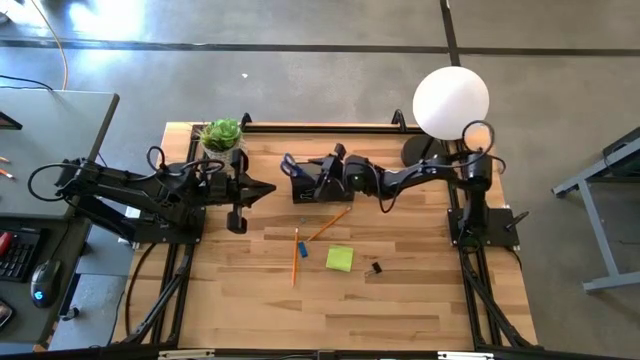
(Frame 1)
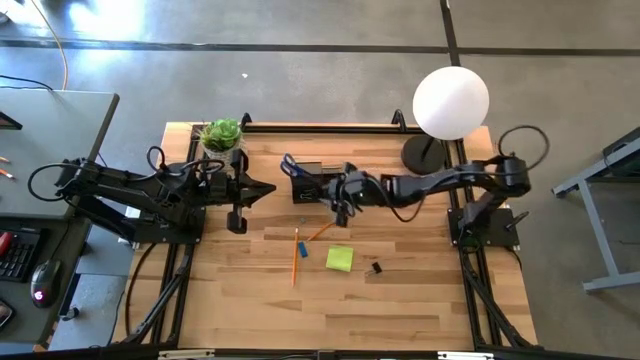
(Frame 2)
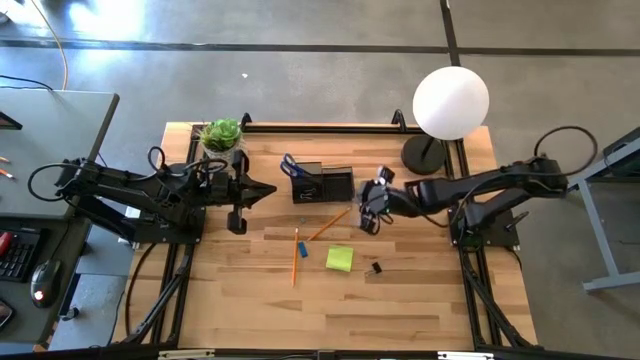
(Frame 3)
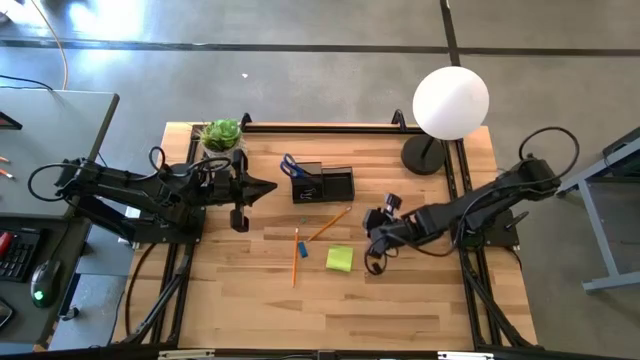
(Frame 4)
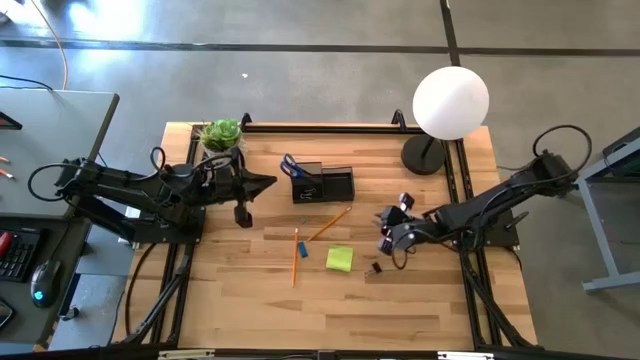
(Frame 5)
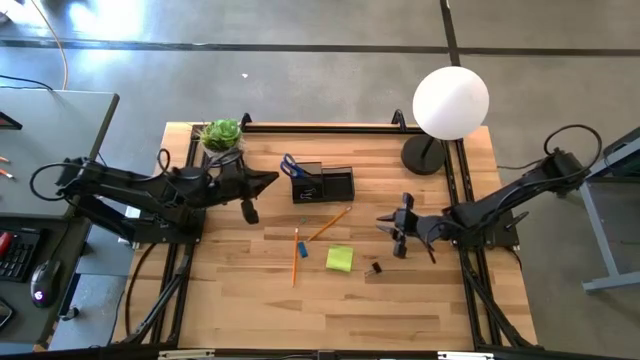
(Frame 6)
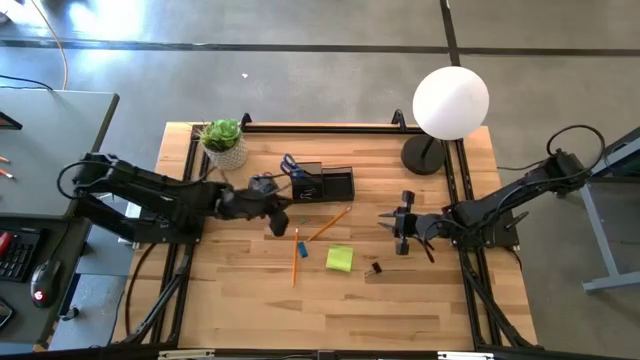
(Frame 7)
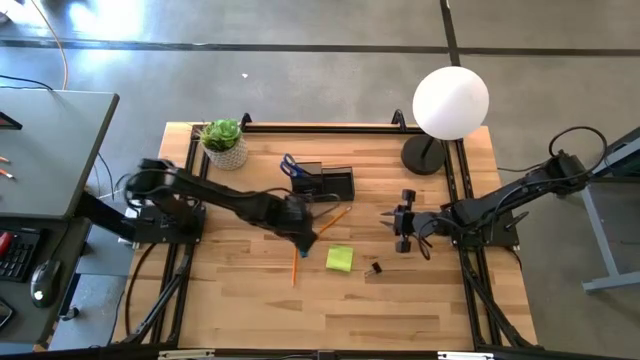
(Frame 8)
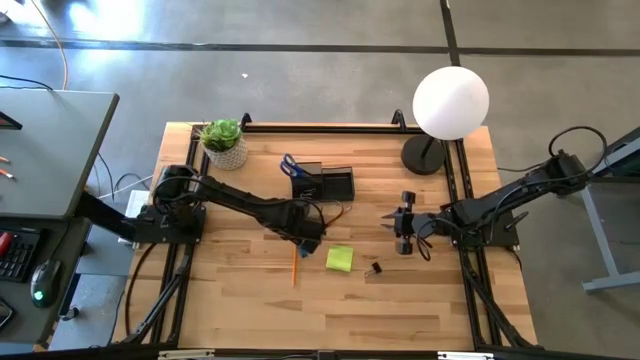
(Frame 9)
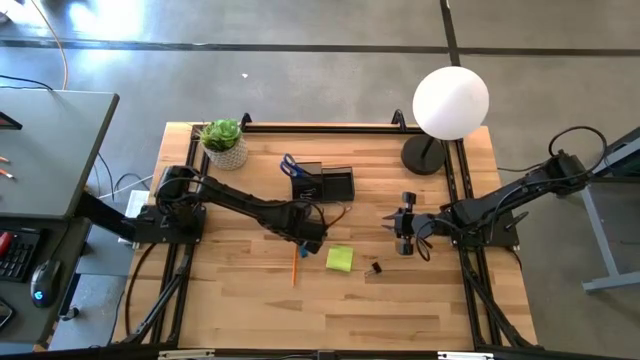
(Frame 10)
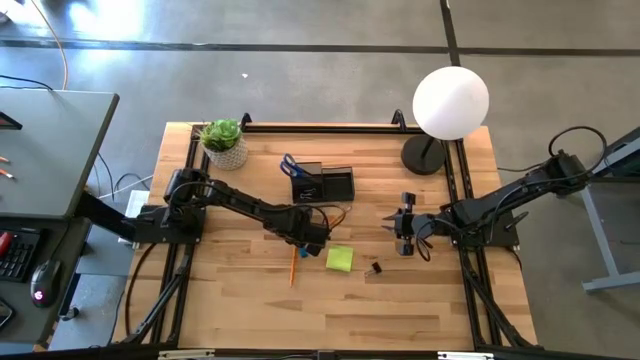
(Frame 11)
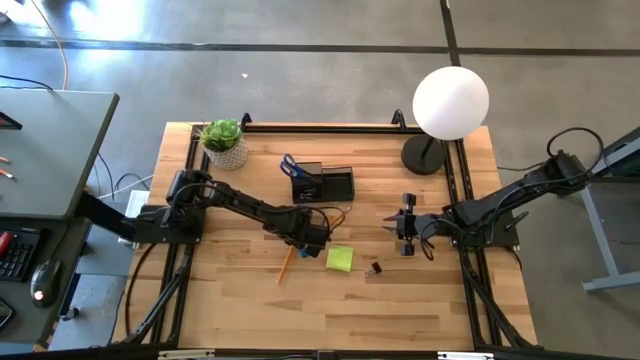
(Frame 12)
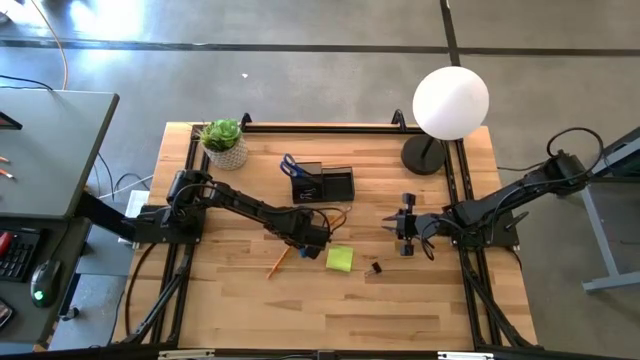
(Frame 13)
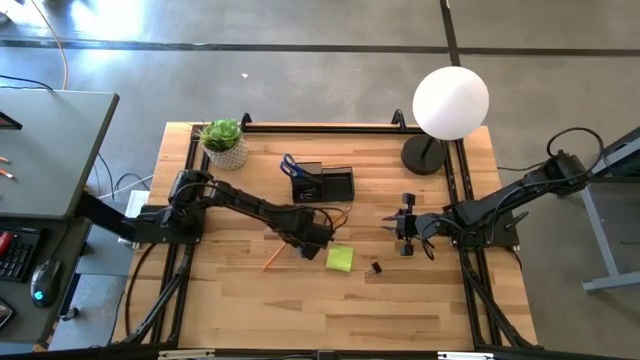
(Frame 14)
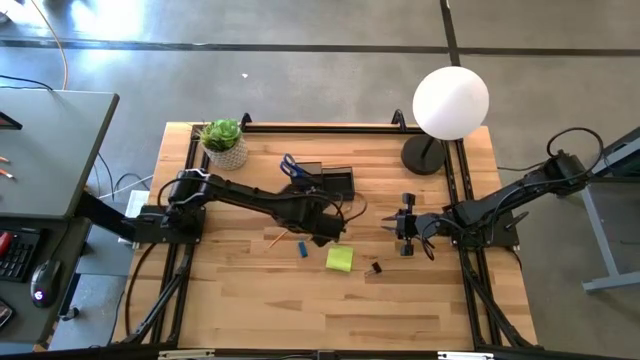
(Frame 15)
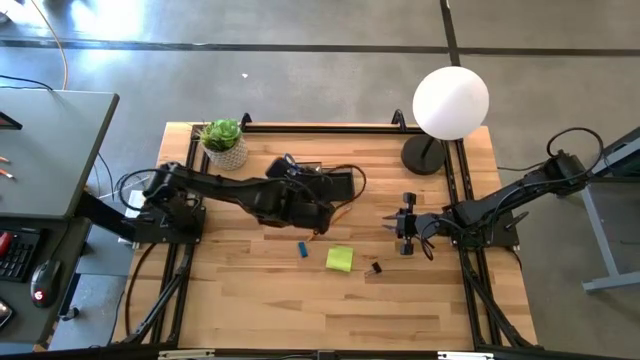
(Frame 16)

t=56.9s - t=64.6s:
Task: Pick and place office supplies into organizer
Put the orange pencil into the black desk organizer

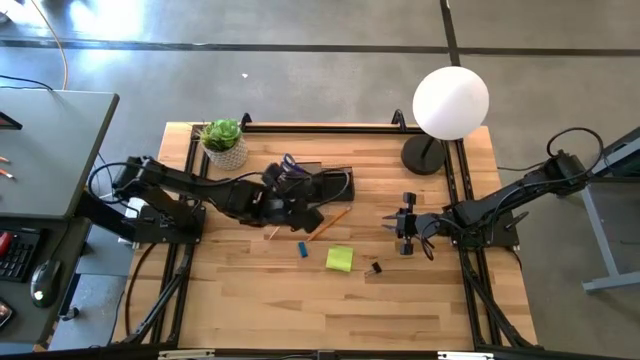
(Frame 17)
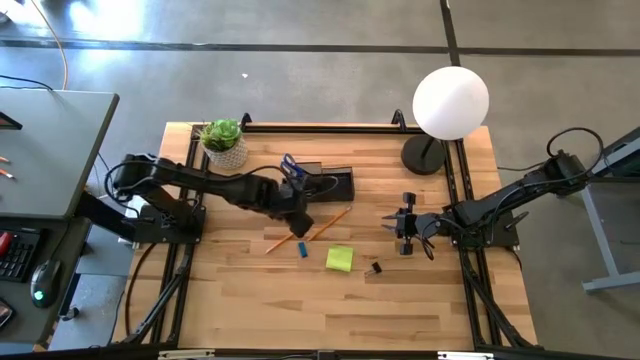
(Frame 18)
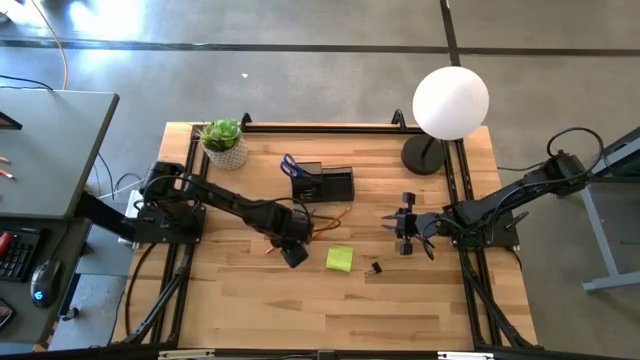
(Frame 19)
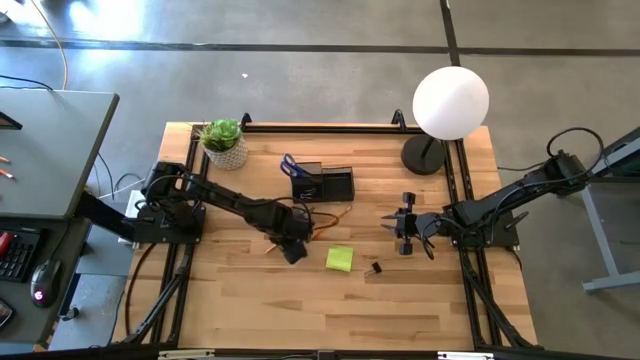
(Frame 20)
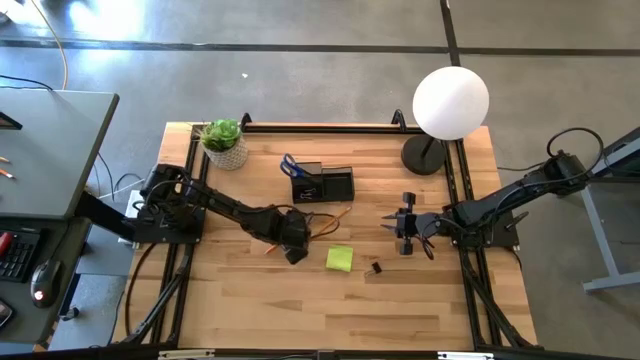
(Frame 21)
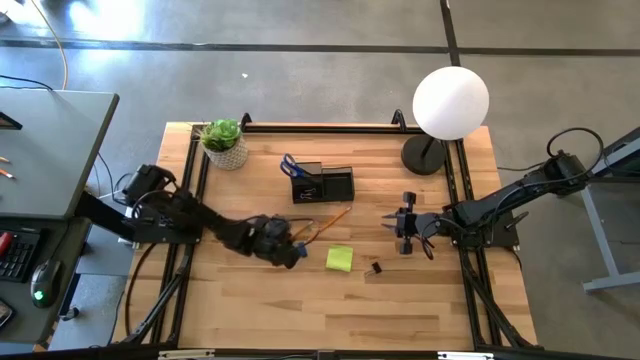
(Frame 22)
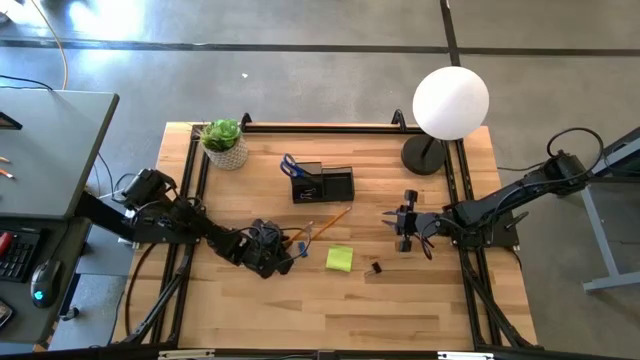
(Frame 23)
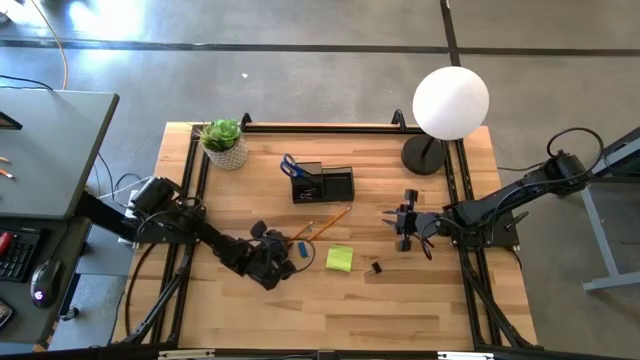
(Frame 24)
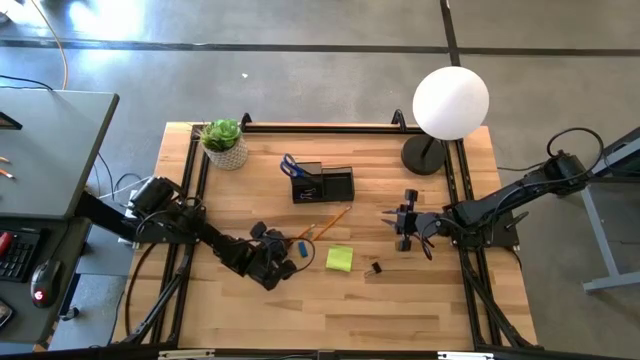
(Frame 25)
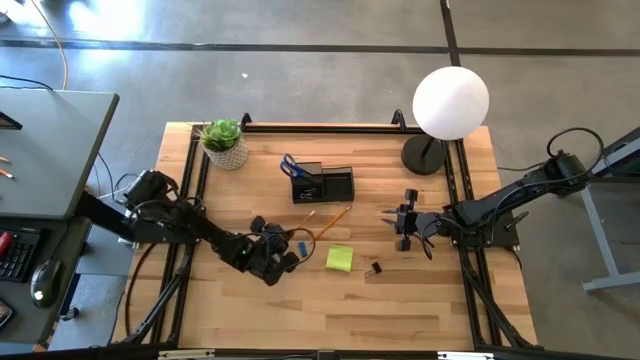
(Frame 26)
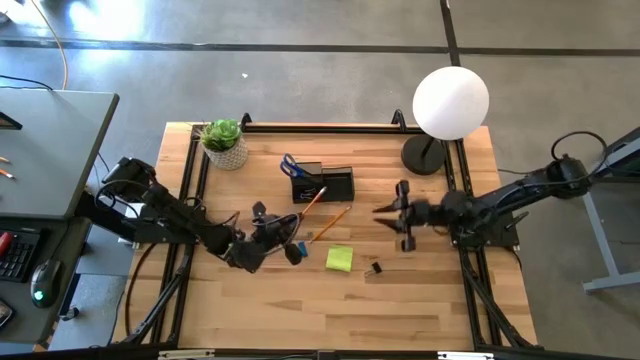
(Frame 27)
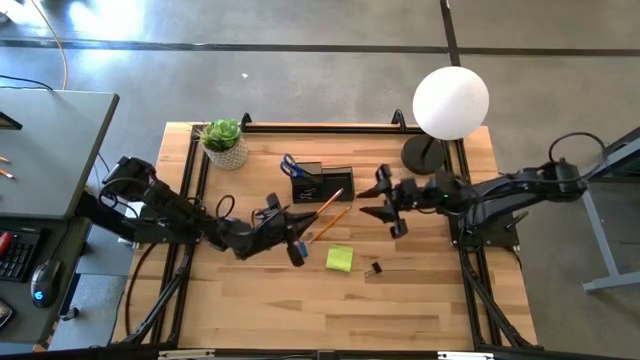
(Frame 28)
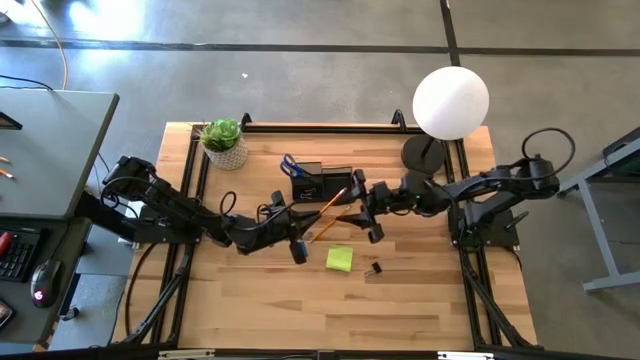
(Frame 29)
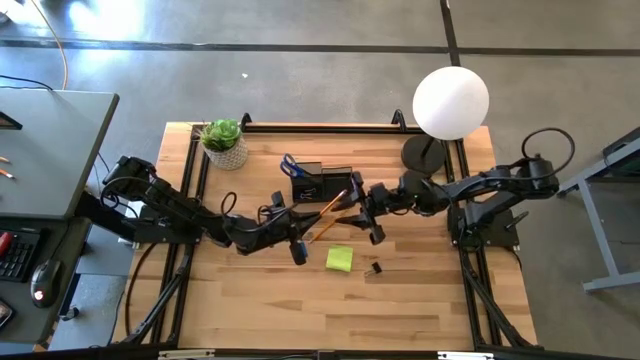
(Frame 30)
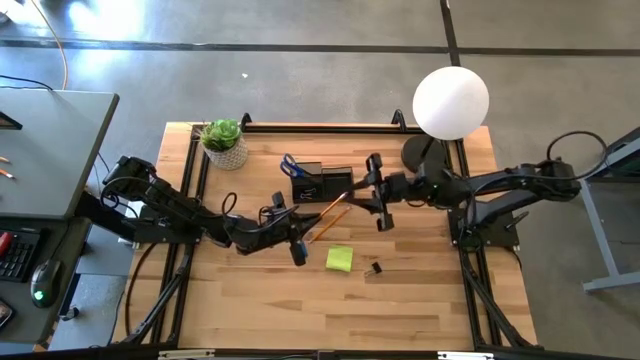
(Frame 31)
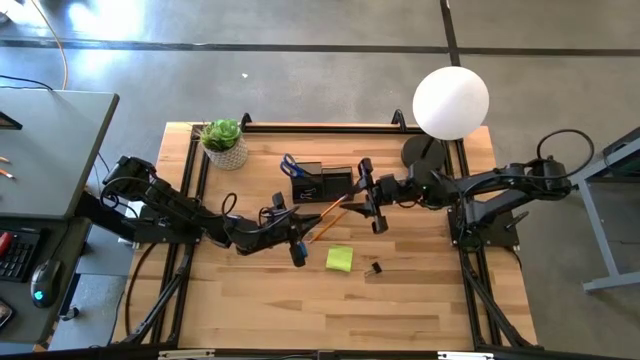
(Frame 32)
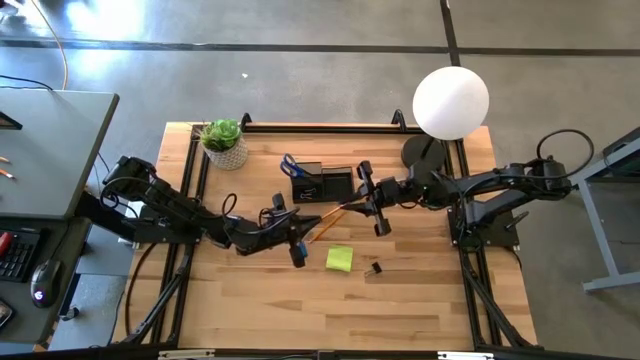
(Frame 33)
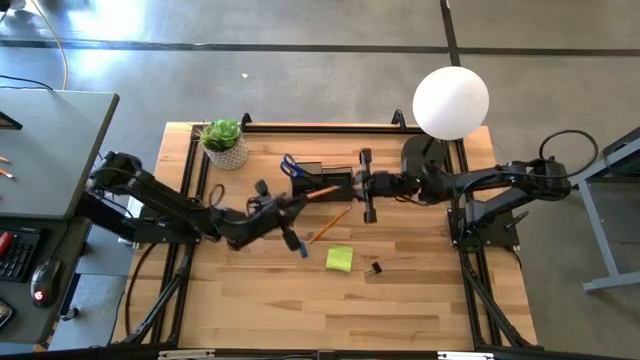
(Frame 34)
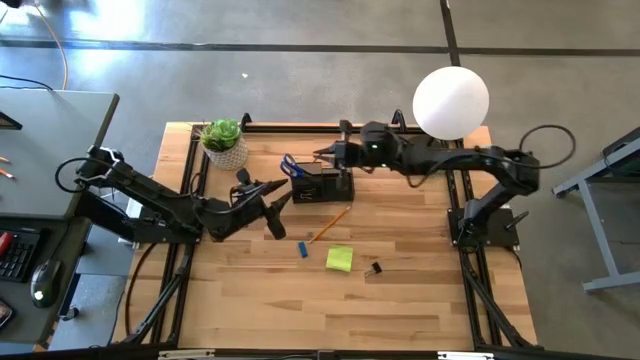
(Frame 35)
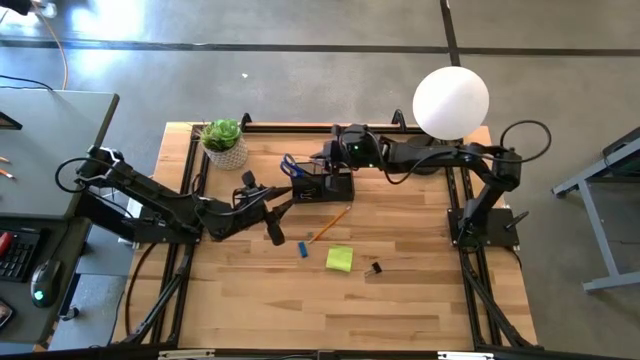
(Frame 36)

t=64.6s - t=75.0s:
Put the orange pencil into the black desk organizer

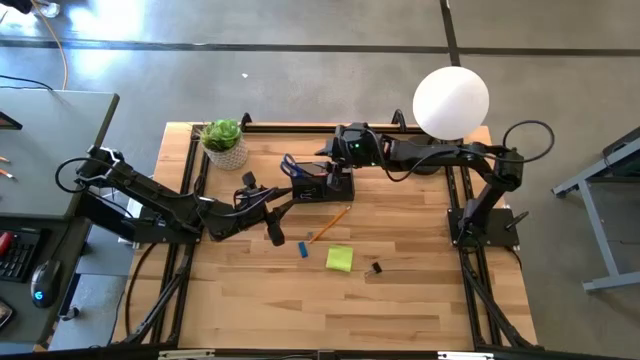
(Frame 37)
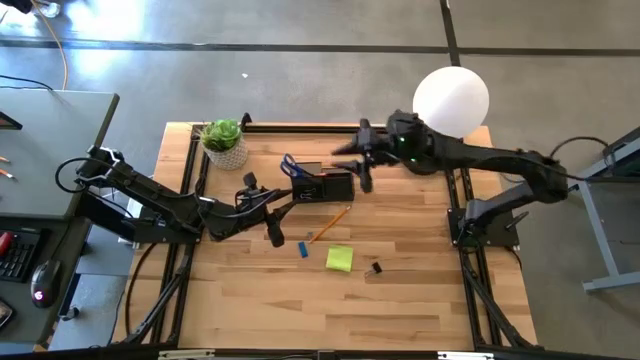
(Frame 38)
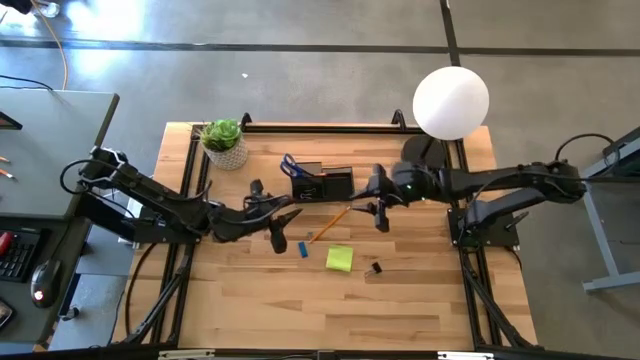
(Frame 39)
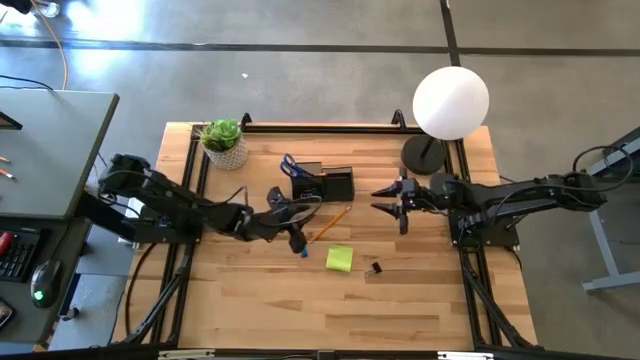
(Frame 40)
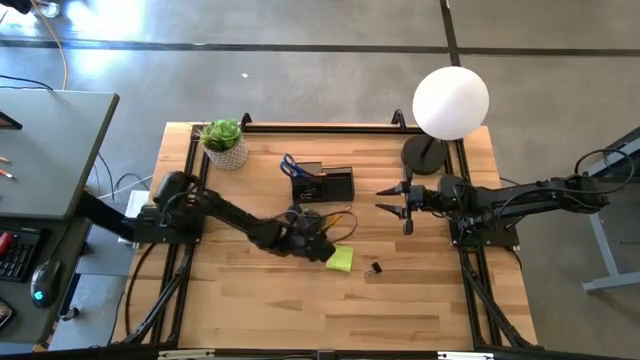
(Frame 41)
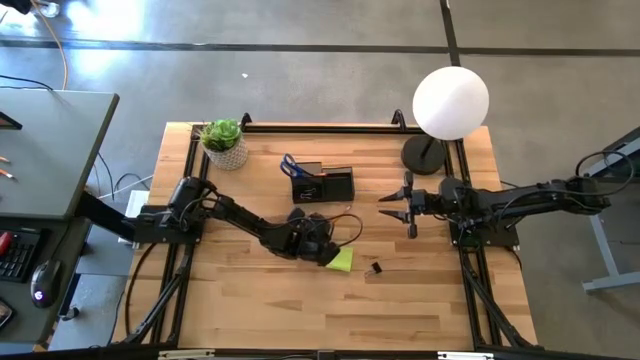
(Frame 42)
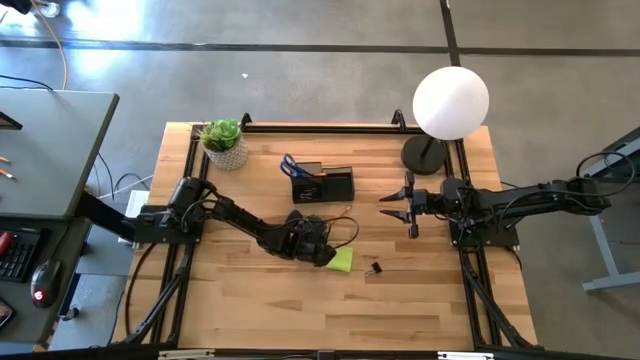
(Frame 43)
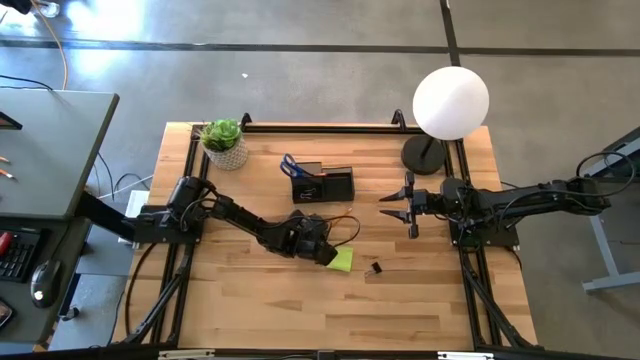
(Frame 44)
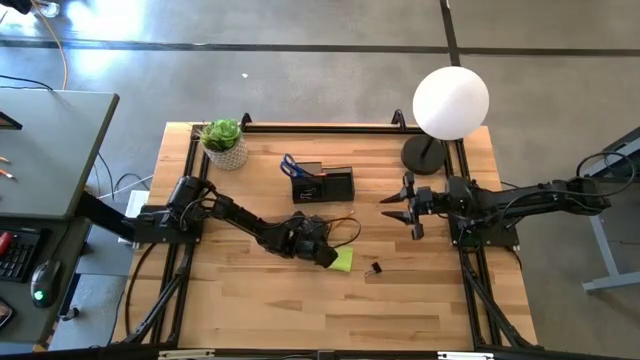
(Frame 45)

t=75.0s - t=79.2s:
Put the orange pencil into the black desk organizer
